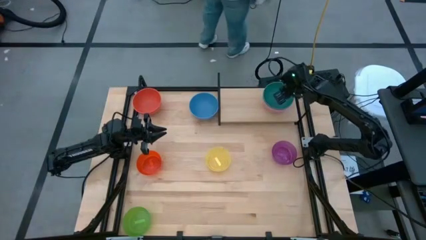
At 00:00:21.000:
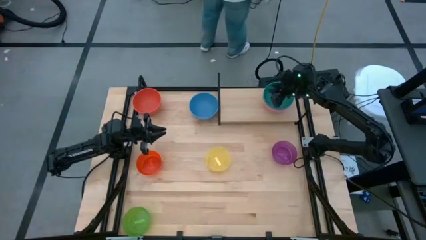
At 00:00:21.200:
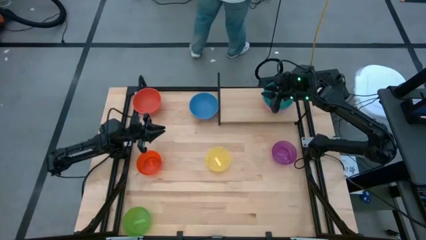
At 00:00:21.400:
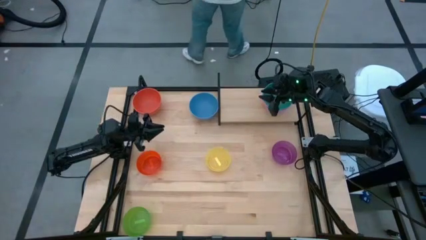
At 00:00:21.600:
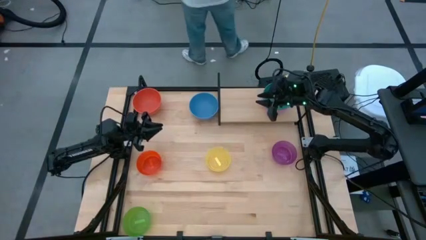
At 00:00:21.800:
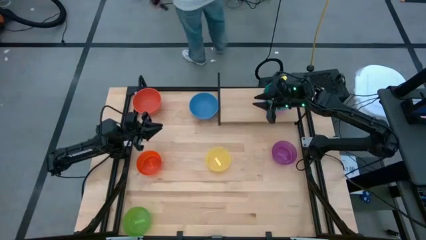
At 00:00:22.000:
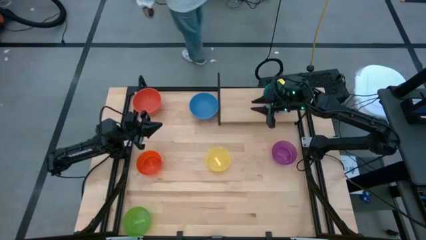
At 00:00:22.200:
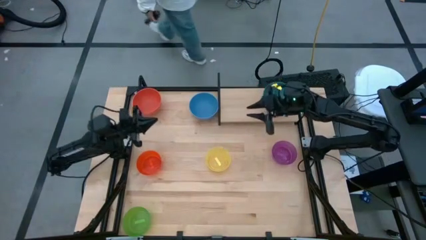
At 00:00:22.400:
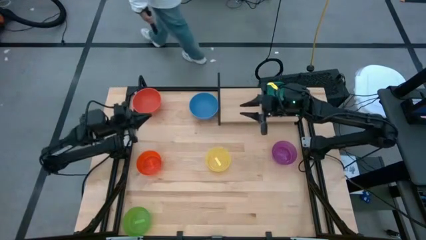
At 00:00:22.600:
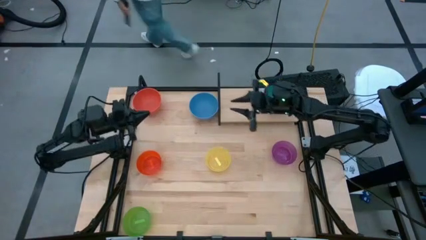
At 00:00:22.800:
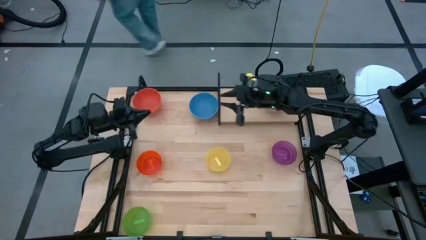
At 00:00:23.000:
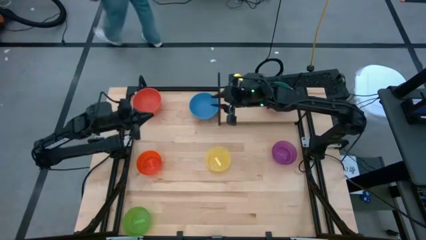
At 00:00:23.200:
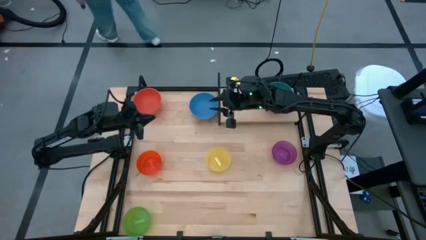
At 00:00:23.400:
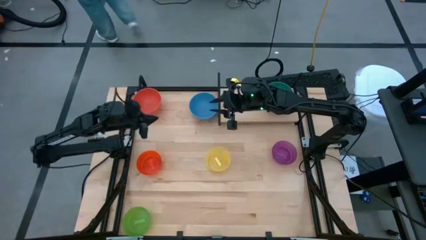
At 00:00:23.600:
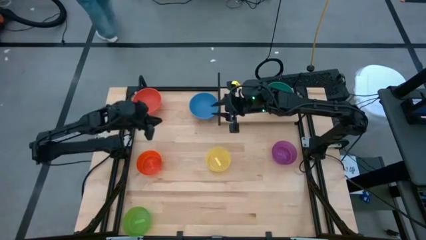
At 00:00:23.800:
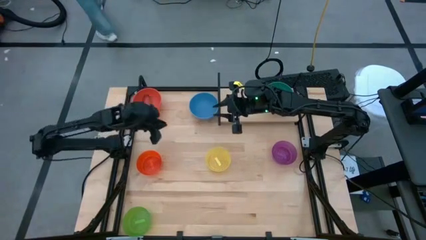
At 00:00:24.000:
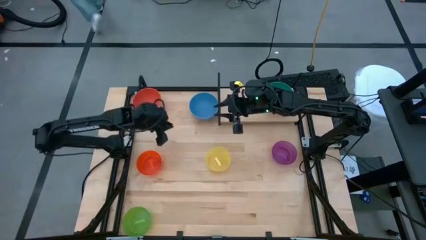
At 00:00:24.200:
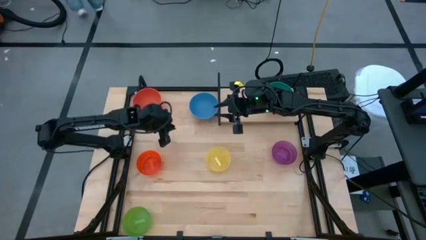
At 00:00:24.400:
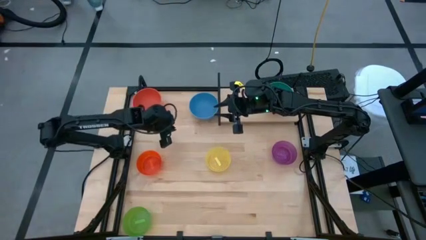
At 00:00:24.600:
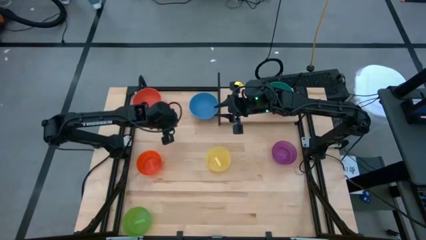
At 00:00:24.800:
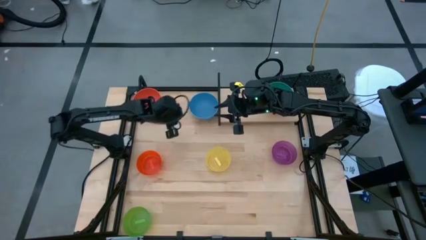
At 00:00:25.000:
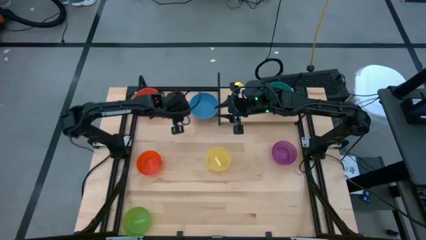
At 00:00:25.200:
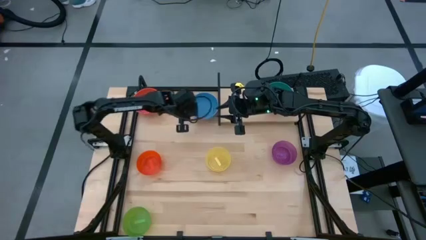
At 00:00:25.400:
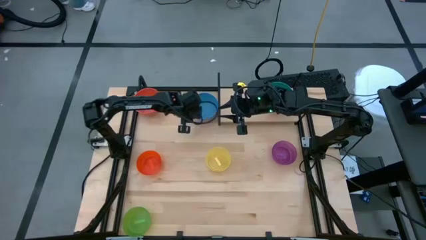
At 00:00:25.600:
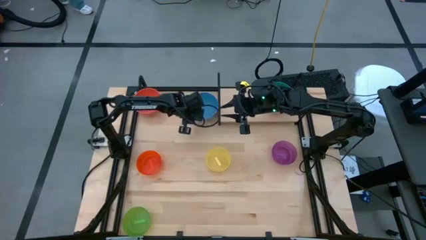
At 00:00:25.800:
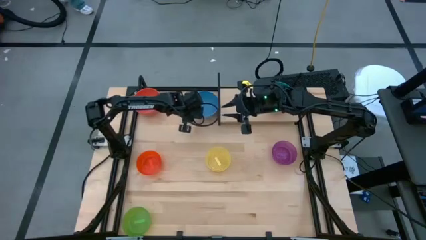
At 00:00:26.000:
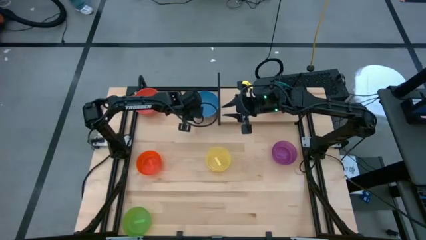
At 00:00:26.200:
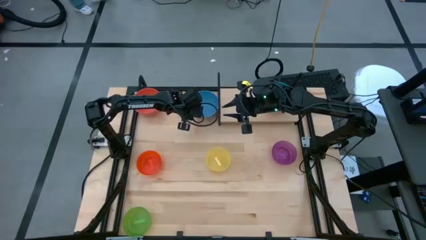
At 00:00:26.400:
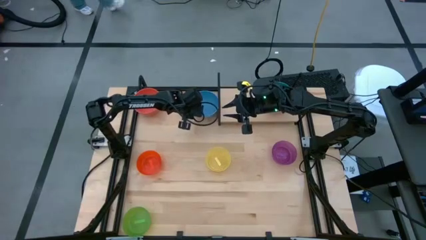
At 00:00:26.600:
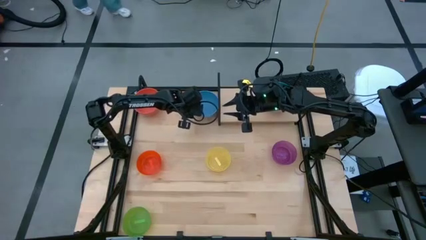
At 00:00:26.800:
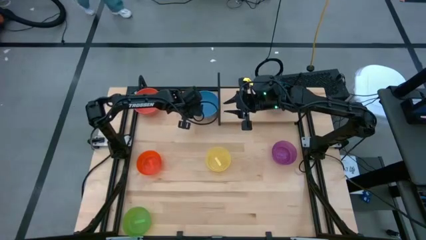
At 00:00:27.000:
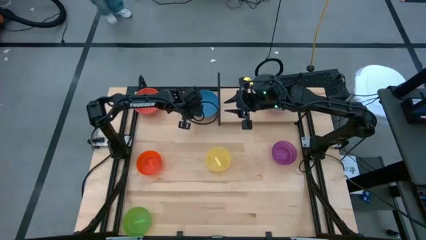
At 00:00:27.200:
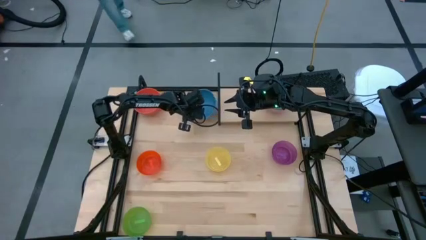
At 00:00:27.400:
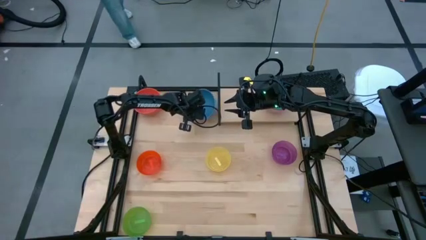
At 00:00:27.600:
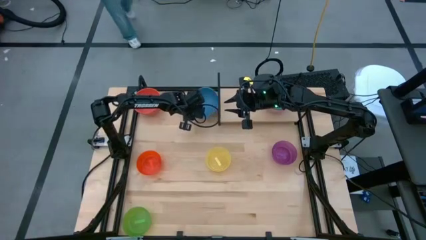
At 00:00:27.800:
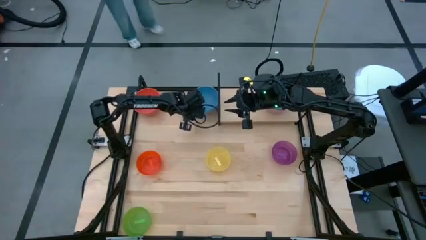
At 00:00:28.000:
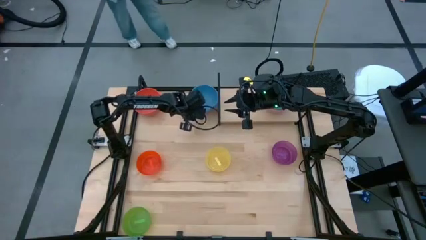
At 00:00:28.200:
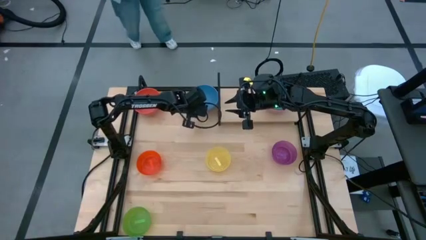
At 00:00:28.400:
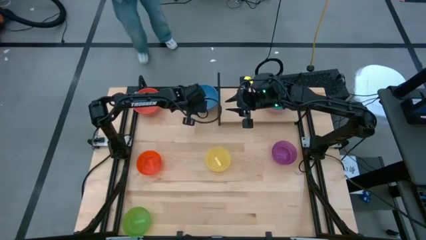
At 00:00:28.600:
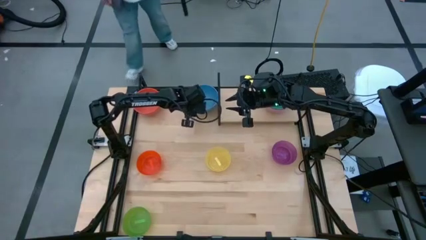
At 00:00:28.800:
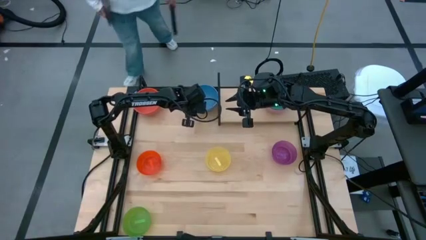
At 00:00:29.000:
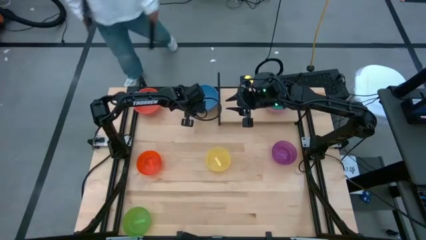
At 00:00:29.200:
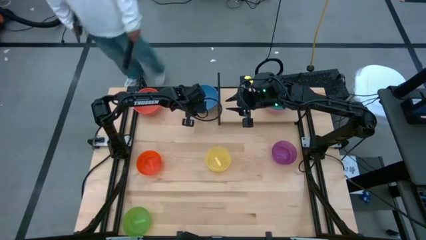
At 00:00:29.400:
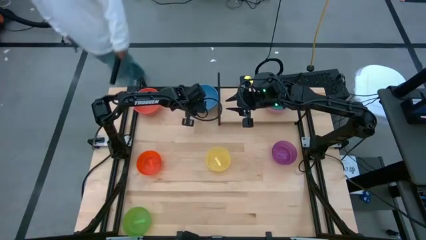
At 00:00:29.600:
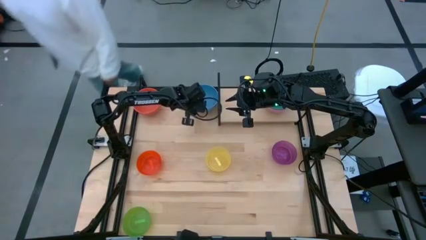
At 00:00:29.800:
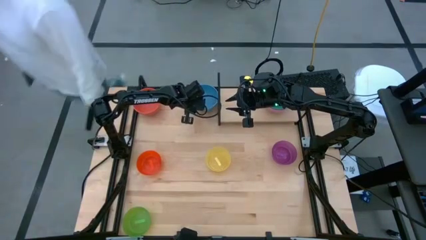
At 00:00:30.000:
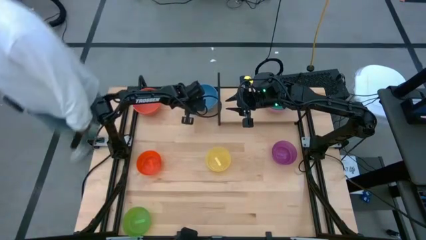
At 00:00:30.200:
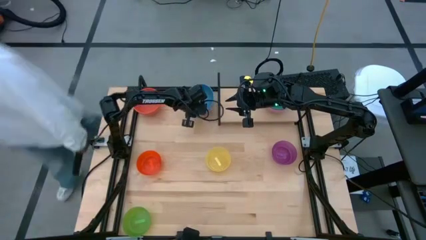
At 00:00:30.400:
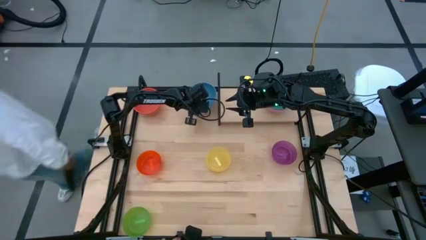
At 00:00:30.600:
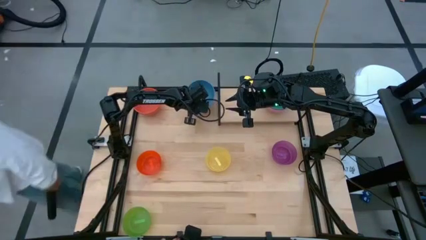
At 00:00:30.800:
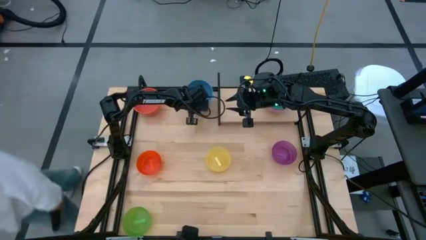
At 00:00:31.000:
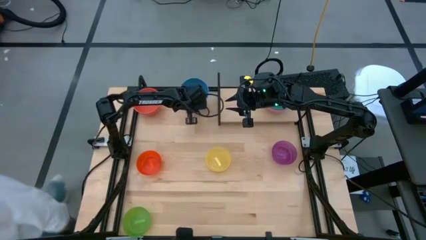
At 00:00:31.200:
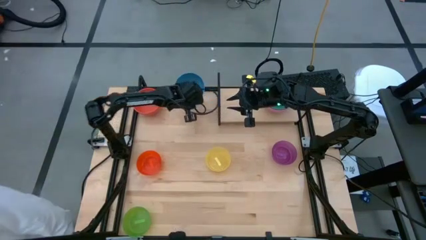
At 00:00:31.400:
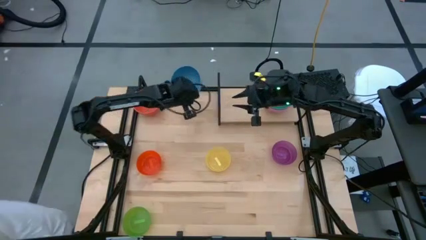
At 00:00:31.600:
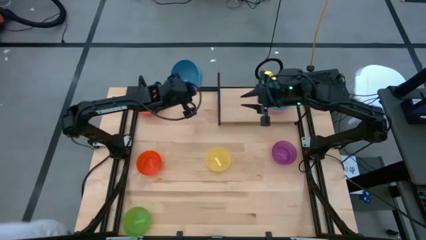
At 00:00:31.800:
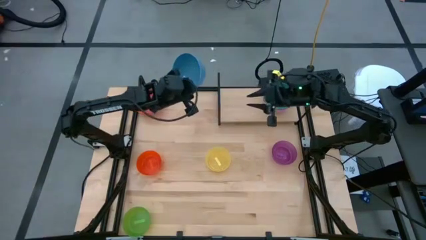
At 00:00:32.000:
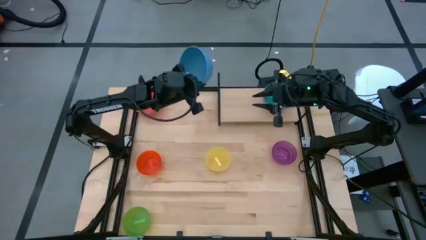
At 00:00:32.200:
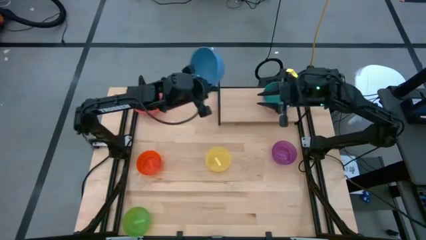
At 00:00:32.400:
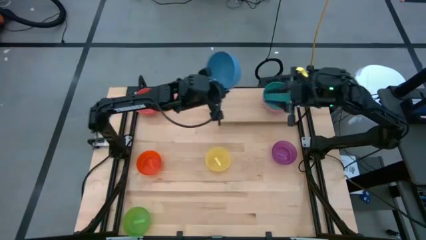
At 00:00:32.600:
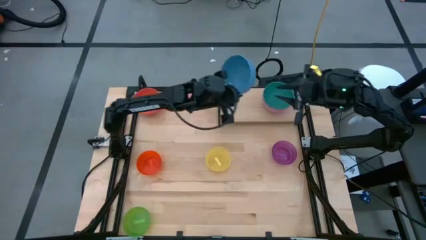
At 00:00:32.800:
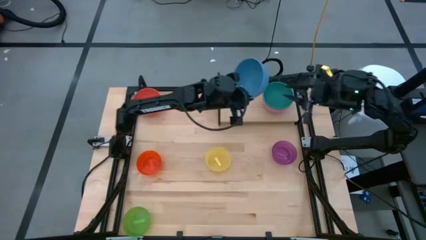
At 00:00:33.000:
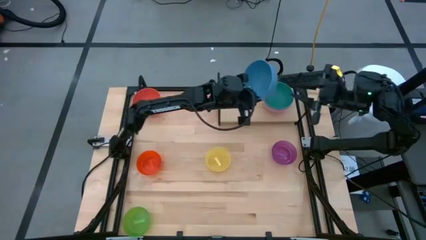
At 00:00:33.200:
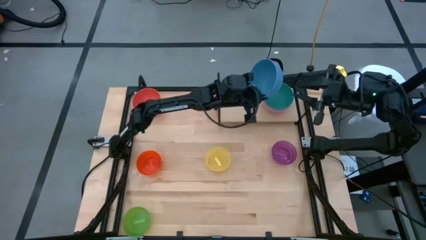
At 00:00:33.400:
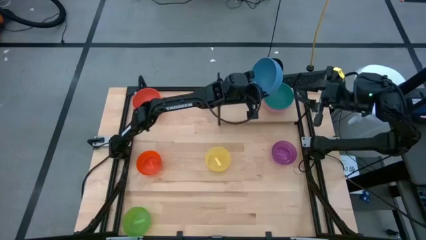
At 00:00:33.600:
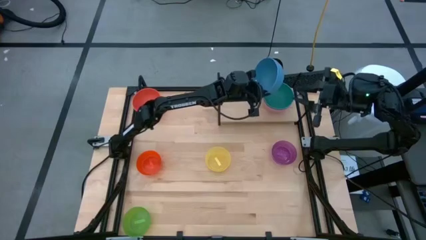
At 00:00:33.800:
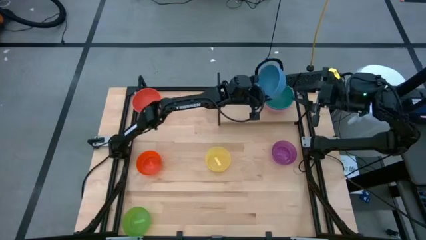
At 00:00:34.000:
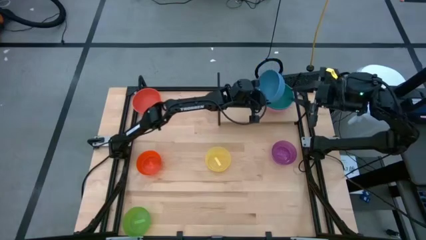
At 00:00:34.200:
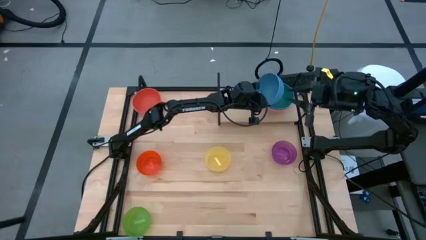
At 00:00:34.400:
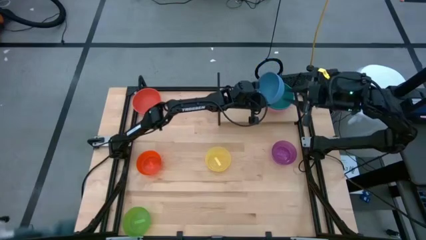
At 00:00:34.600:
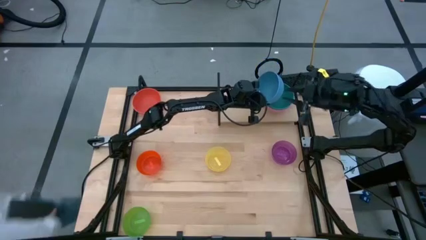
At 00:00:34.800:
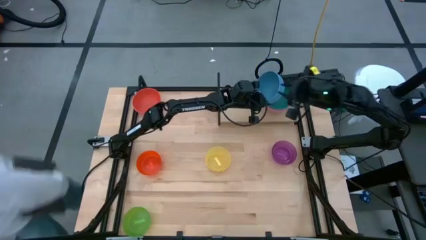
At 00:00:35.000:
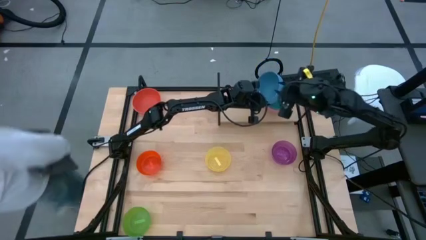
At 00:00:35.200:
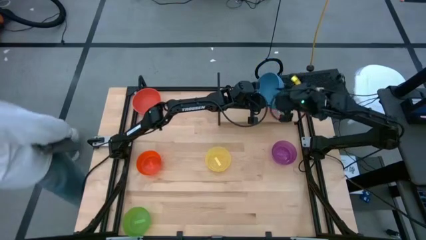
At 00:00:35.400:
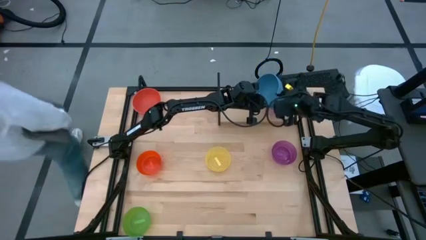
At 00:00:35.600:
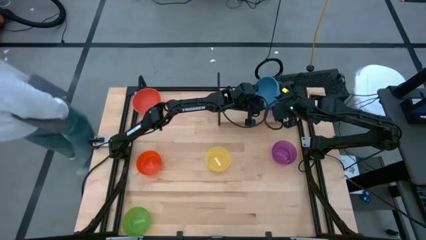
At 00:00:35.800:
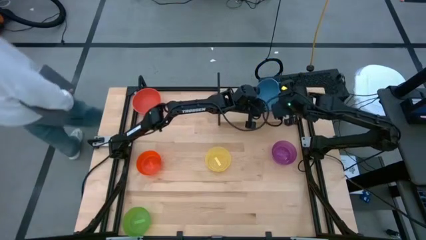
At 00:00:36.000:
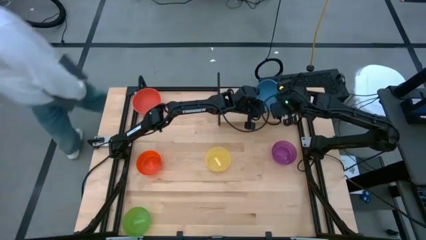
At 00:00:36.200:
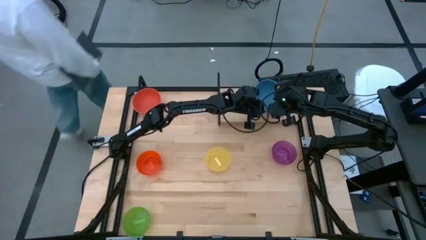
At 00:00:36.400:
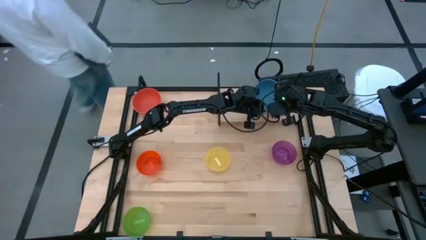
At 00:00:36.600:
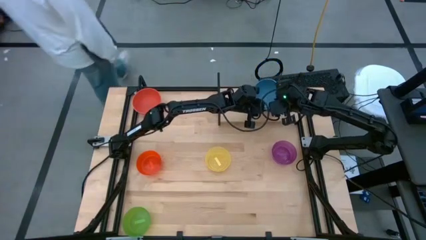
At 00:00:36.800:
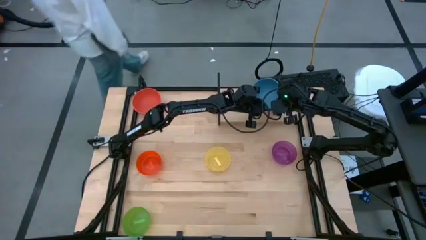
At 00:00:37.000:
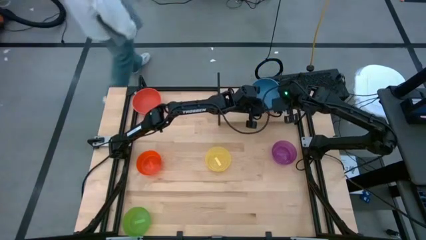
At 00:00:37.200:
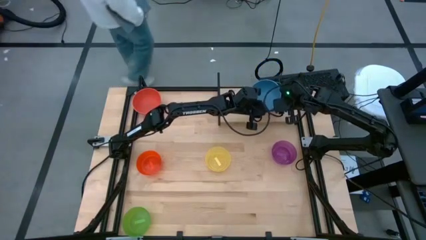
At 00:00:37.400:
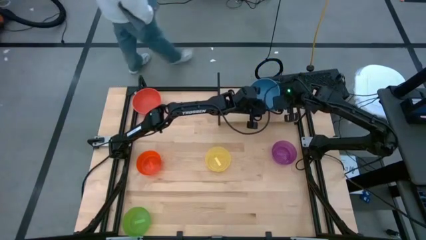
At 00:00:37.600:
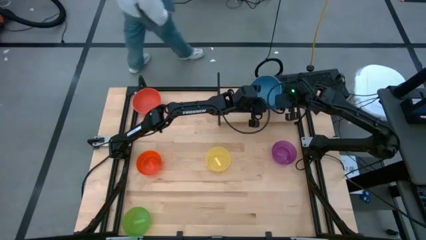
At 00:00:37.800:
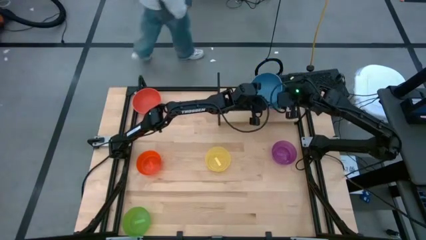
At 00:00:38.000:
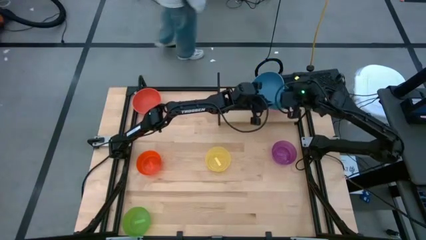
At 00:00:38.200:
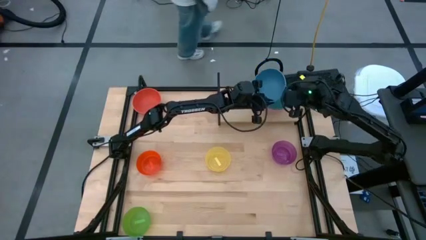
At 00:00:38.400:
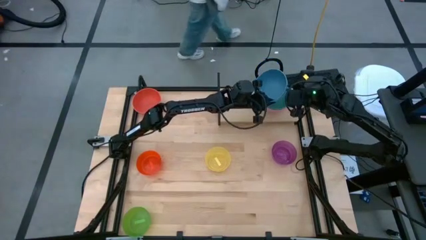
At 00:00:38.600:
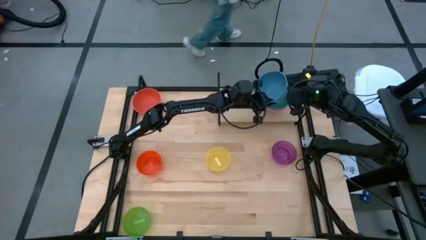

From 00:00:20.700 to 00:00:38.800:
Task: Place and stack bowls onto a shelf
Stack the blue bowl on top of the green bowl on the shelf
